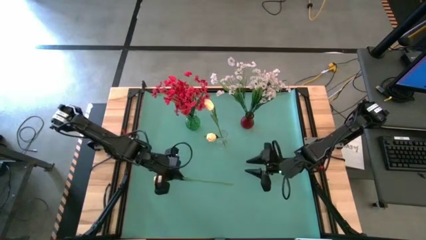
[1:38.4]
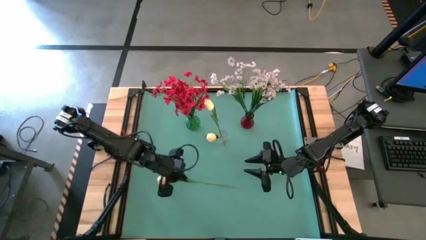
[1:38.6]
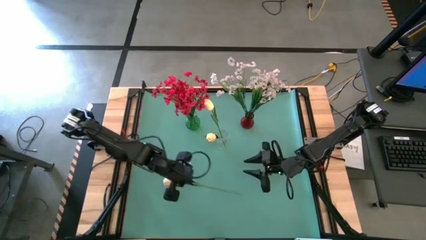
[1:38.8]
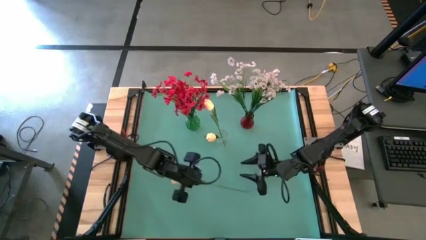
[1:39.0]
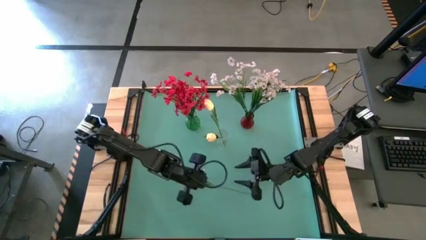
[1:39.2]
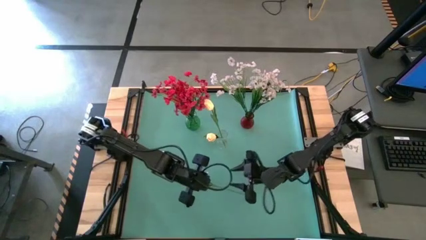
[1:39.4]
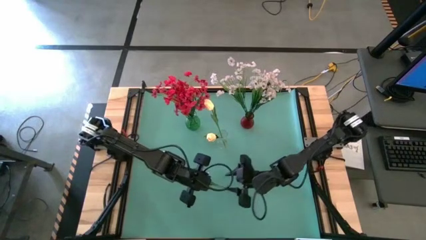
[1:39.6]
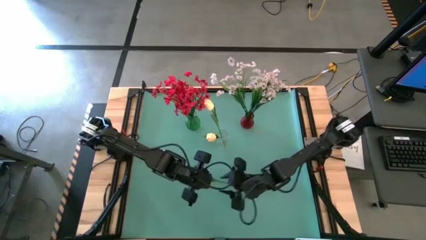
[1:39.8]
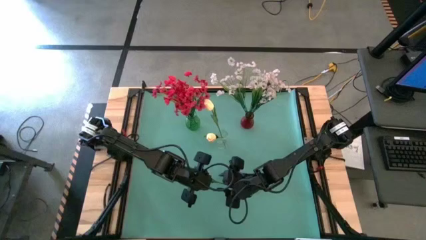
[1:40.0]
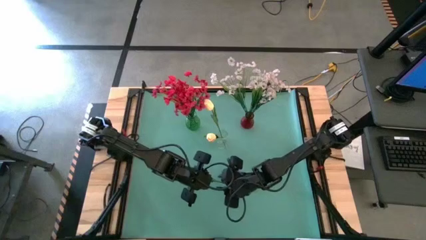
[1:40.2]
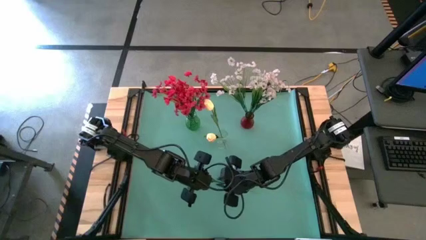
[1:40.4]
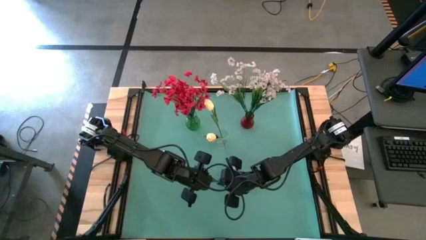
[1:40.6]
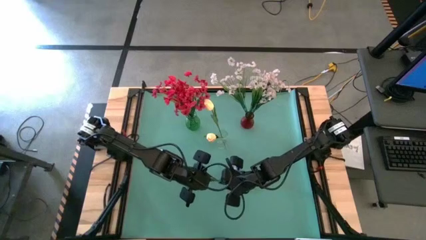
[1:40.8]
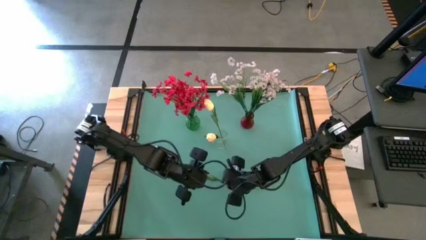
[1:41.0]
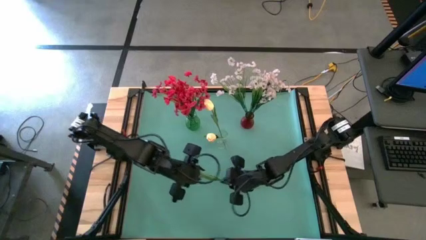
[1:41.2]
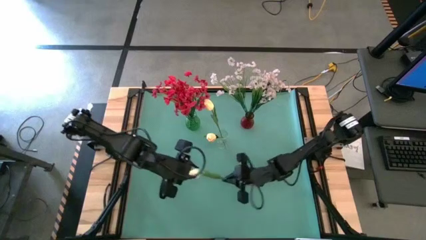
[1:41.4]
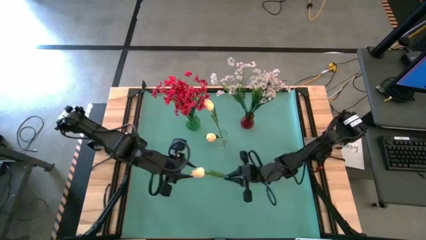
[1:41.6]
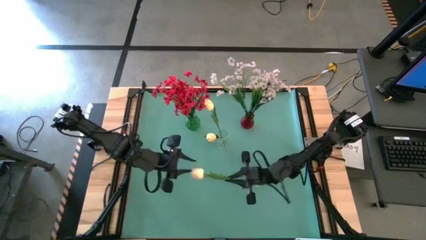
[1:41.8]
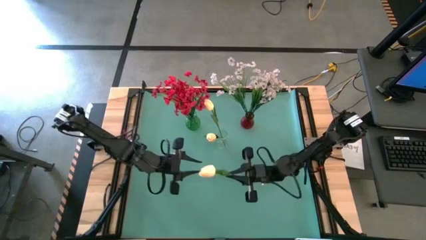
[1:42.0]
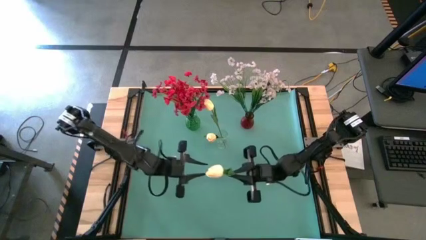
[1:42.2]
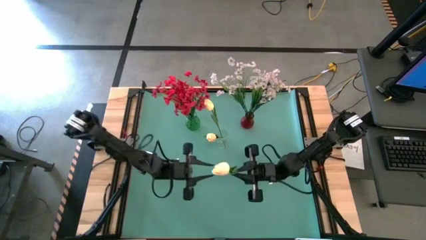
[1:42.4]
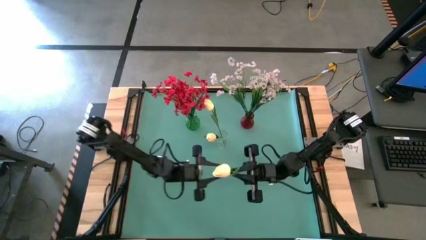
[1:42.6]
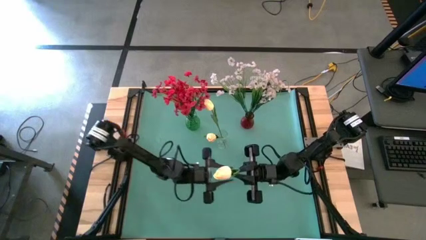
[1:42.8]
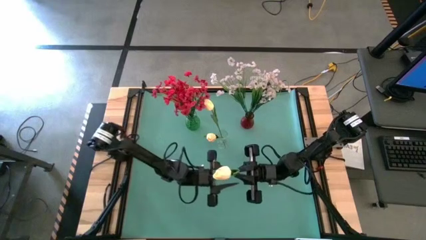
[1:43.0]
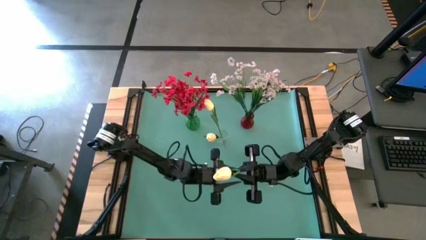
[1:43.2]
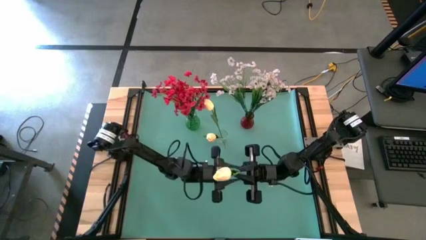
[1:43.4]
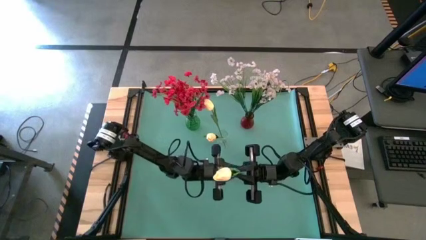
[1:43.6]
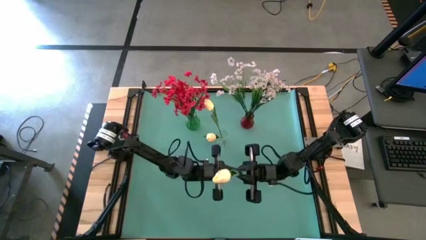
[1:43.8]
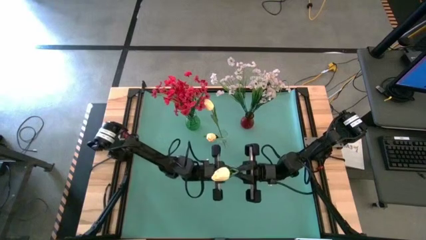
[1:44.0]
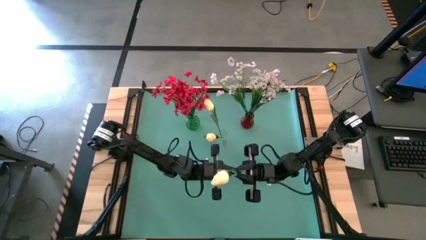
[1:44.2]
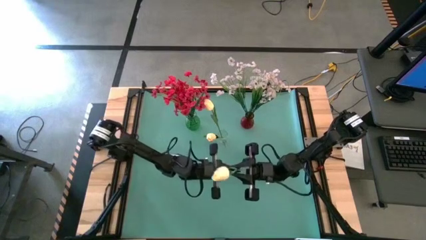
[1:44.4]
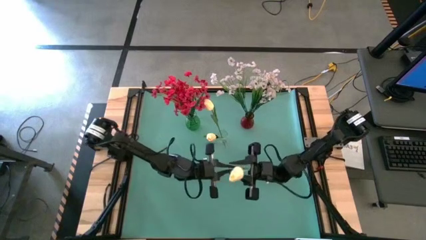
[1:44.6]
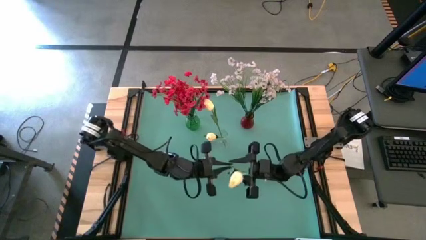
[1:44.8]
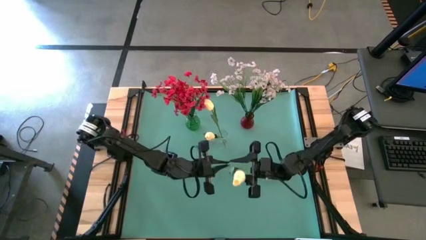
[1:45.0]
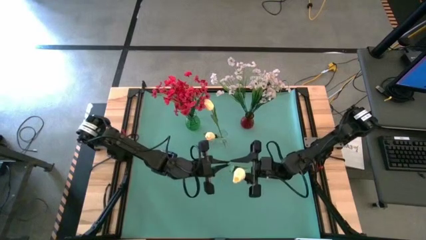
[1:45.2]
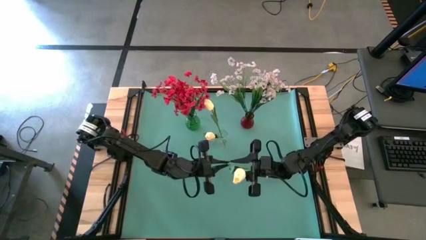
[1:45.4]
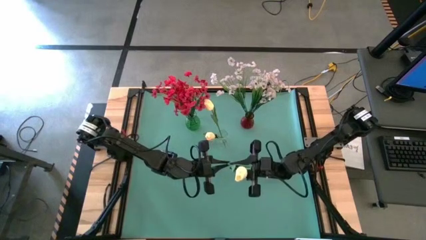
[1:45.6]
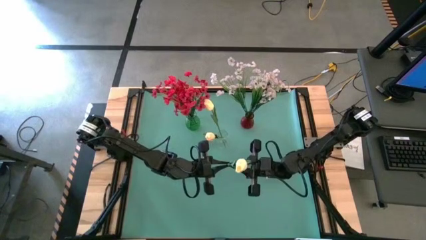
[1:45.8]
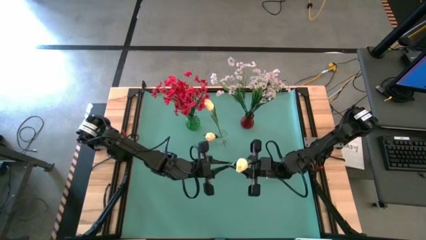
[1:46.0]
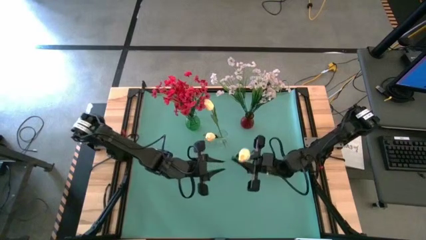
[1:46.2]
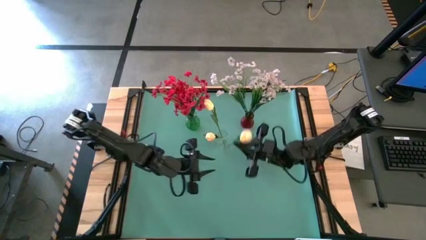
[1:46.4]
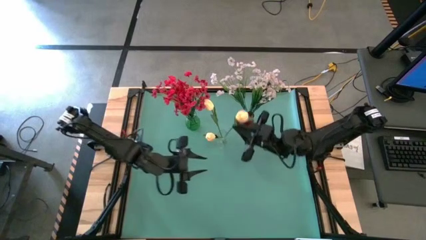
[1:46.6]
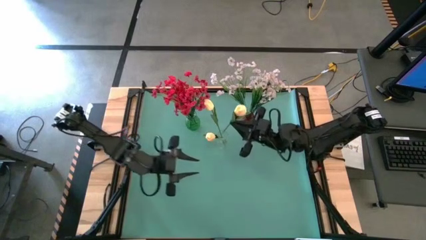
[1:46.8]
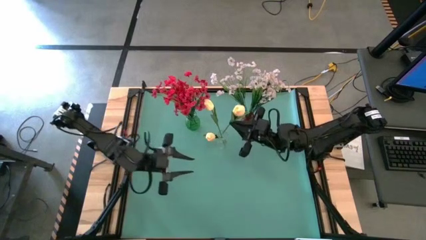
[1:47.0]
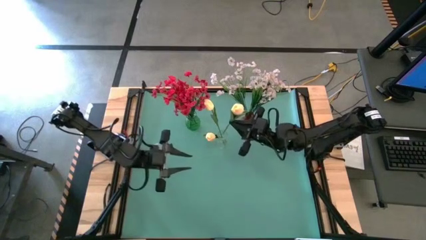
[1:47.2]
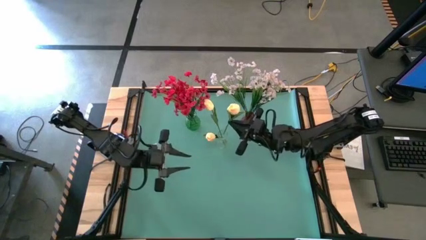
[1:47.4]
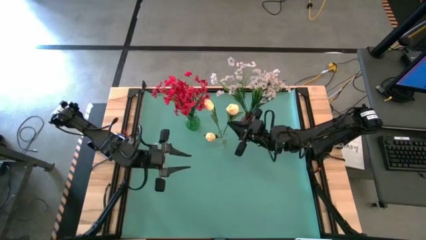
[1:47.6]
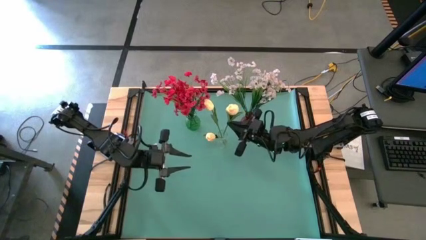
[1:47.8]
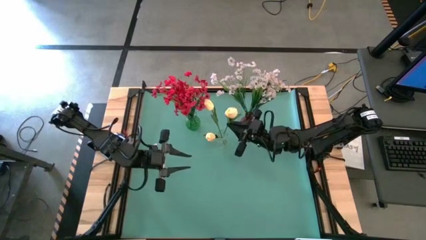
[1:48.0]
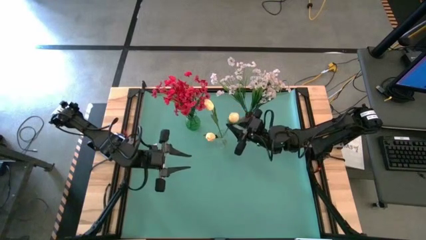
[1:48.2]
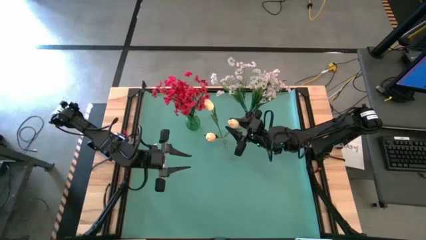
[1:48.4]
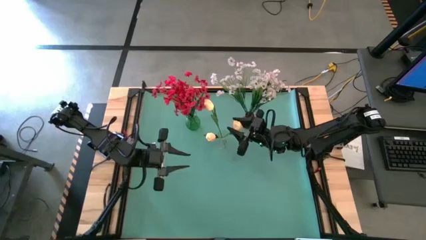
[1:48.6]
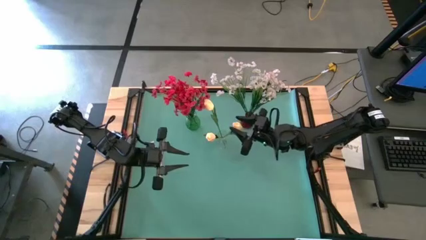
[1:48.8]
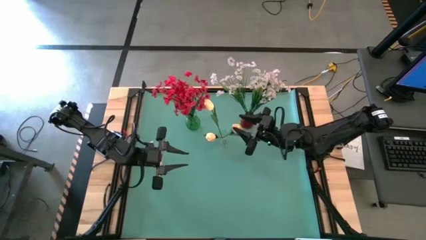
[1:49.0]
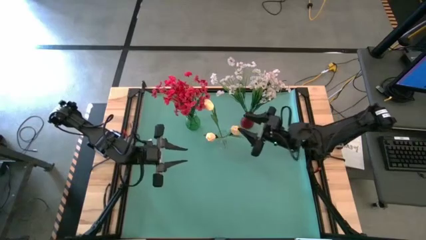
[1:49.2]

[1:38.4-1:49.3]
Task: Sort flowers into vase by color
Put the yellow flower into the transparent vase

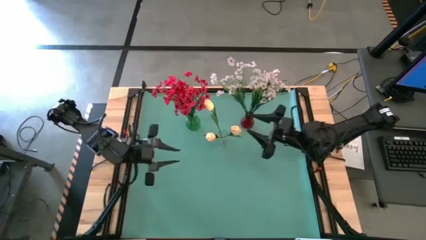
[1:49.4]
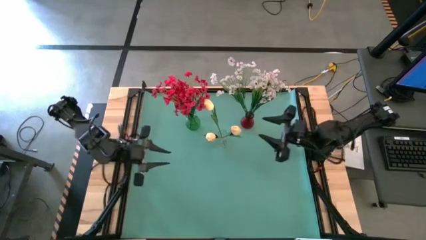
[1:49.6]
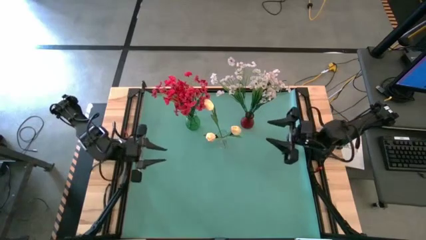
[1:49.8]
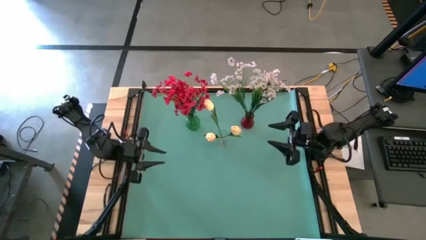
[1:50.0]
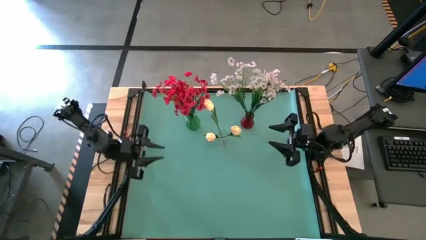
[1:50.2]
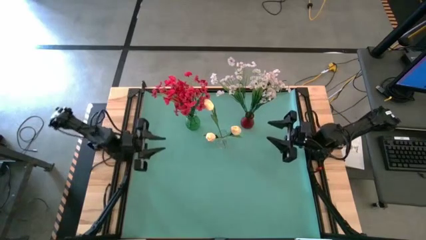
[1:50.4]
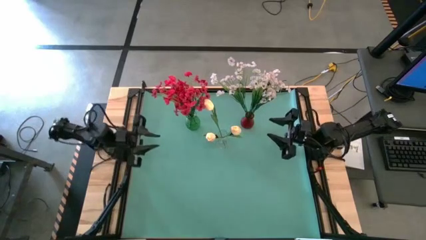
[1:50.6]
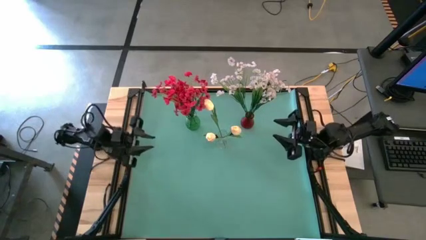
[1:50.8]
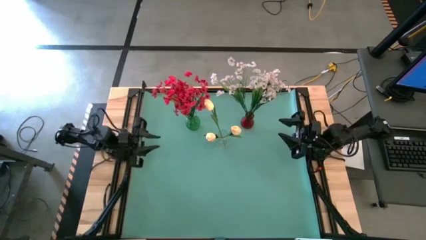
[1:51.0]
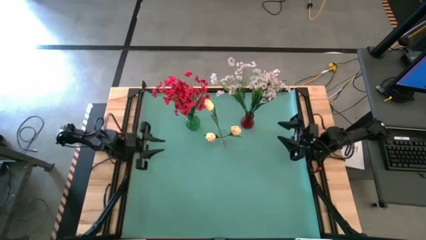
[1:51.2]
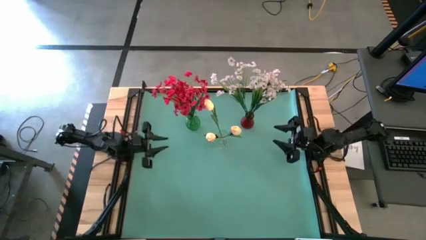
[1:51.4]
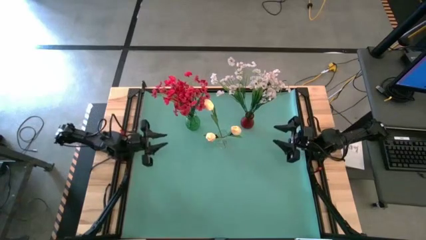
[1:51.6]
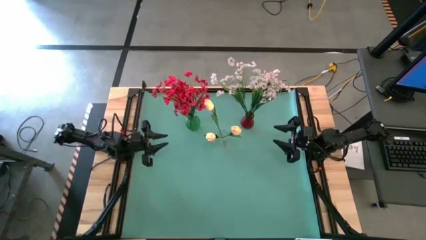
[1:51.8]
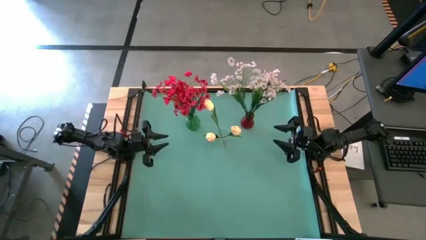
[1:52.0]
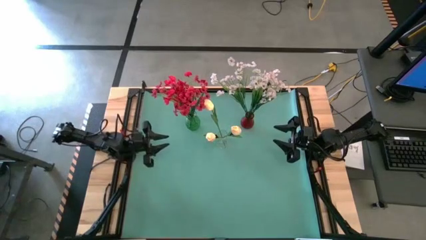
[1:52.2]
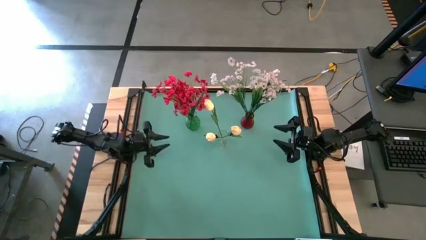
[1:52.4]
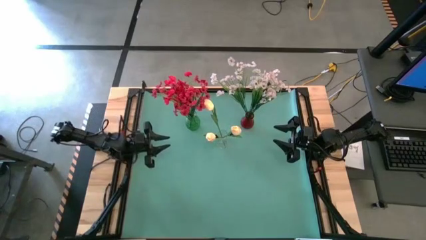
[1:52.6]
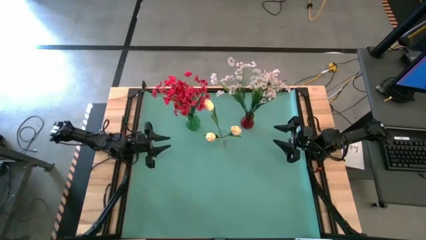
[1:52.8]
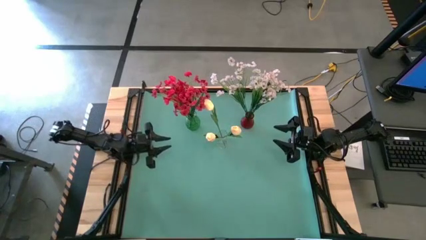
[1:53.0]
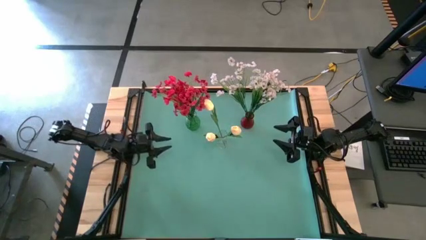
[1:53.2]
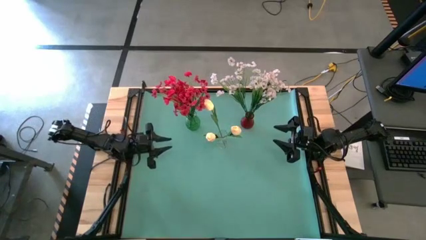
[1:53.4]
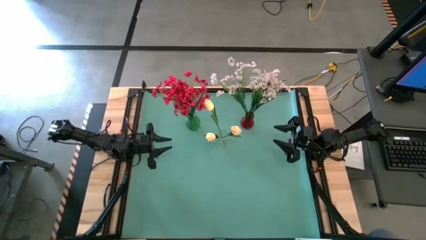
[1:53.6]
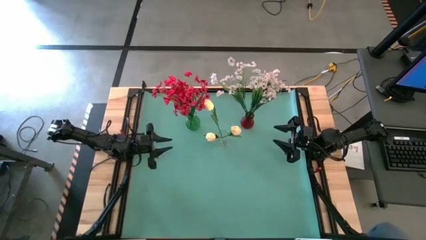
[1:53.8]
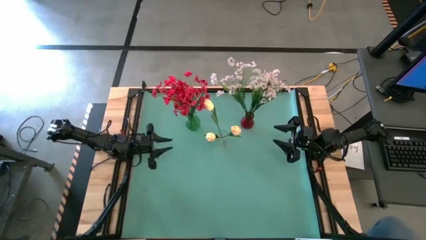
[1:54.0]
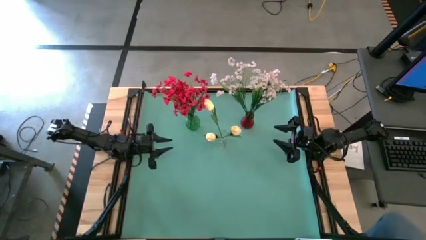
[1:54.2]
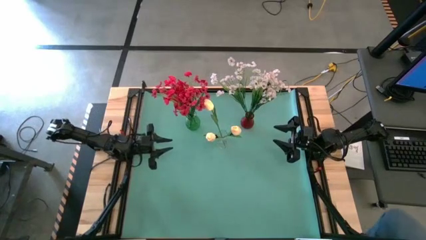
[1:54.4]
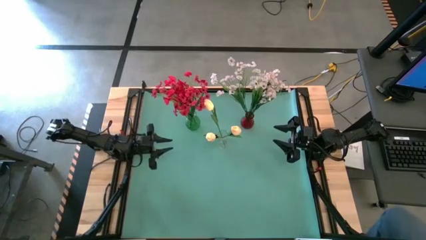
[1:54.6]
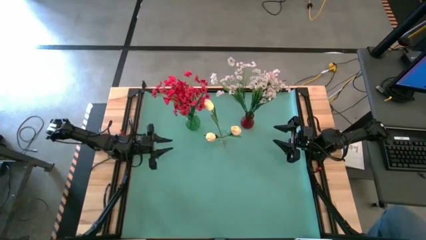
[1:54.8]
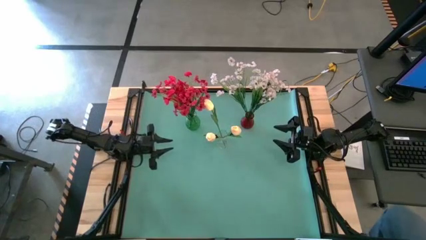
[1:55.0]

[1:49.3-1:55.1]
Return to Home Position
